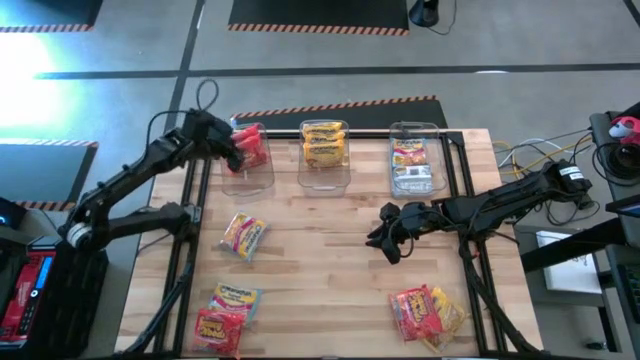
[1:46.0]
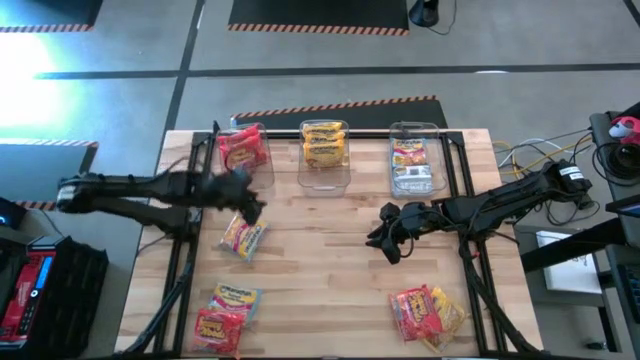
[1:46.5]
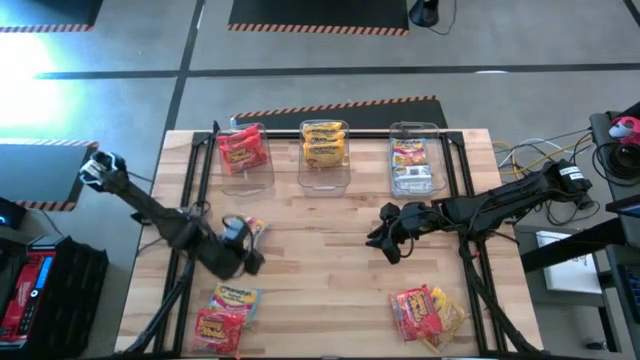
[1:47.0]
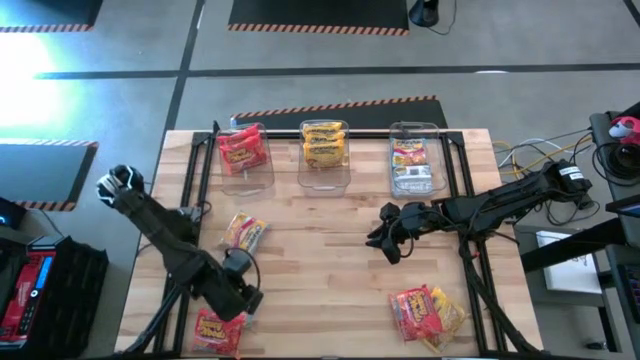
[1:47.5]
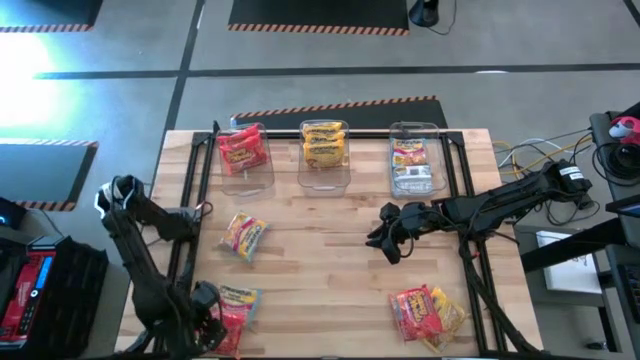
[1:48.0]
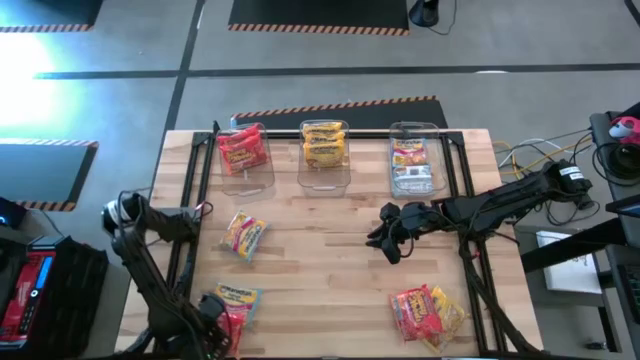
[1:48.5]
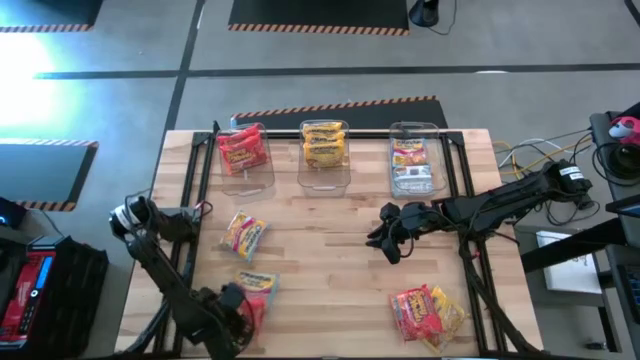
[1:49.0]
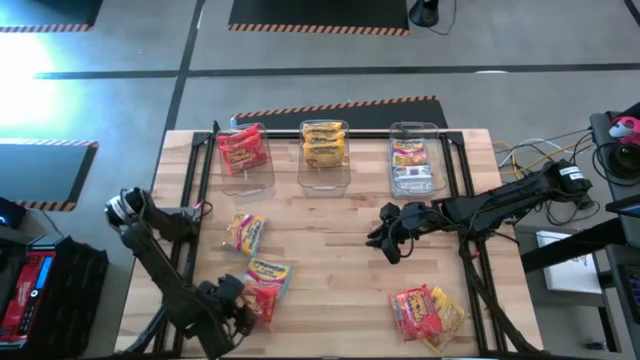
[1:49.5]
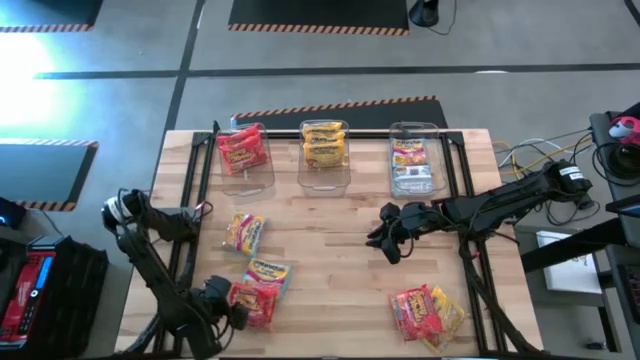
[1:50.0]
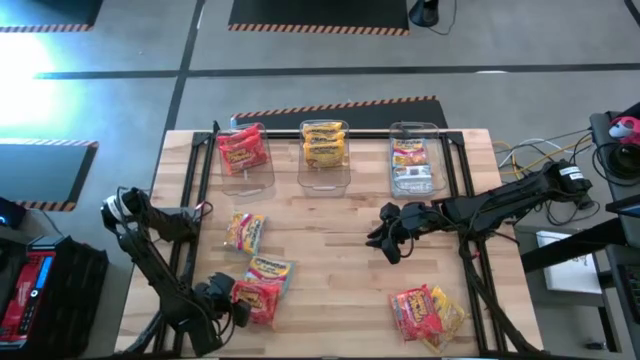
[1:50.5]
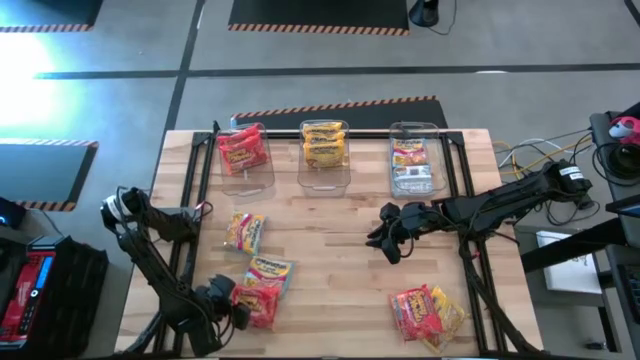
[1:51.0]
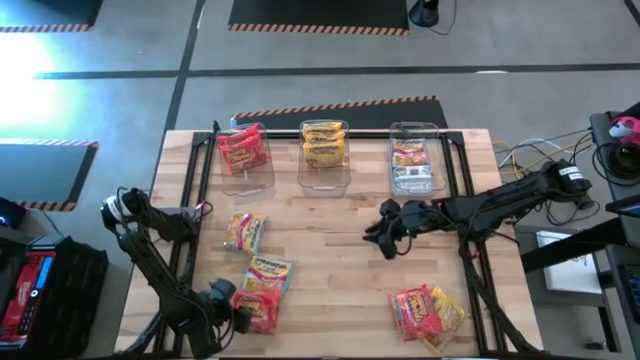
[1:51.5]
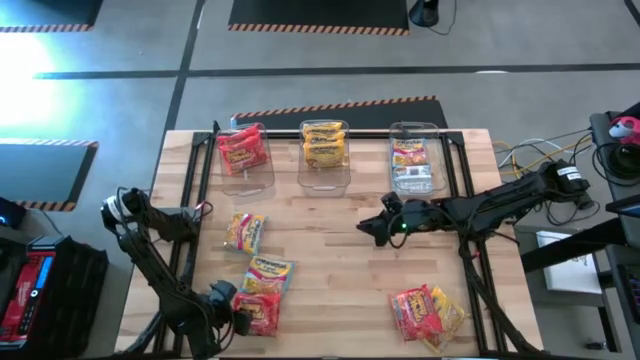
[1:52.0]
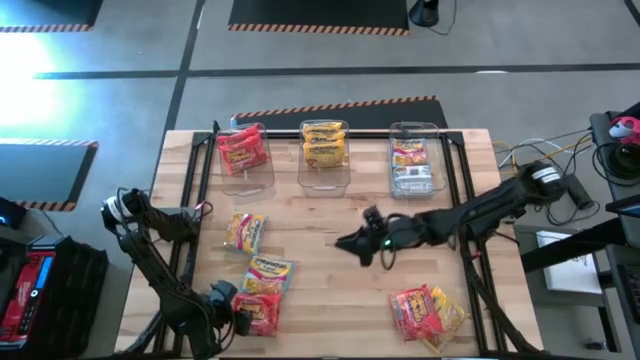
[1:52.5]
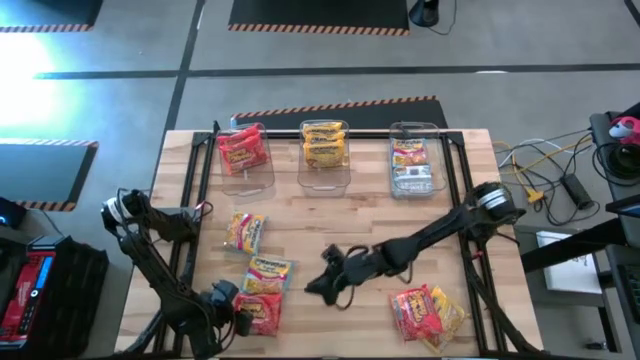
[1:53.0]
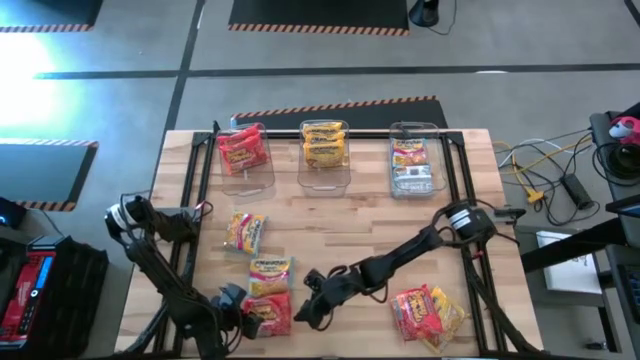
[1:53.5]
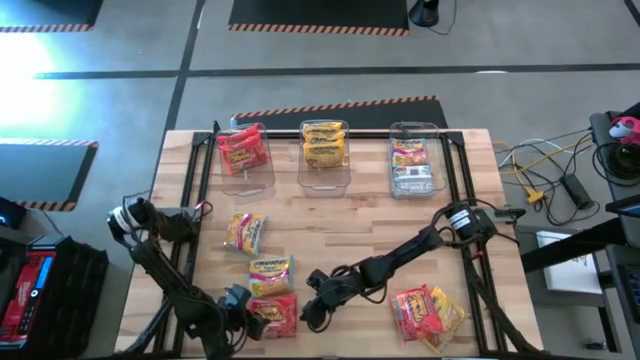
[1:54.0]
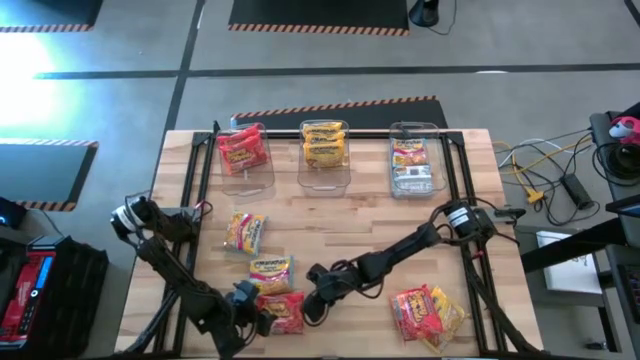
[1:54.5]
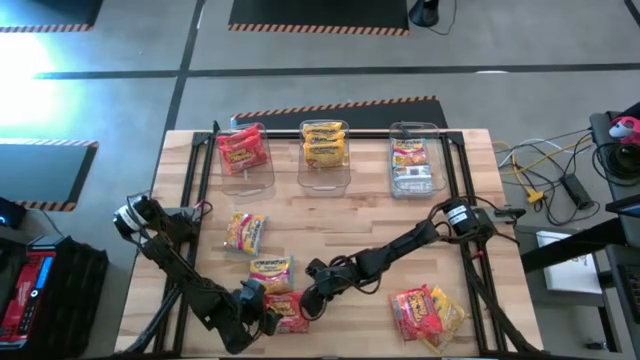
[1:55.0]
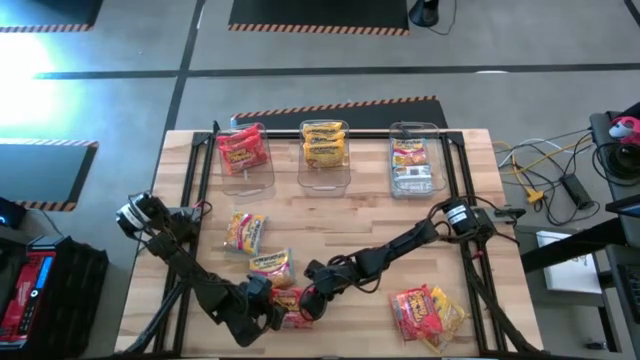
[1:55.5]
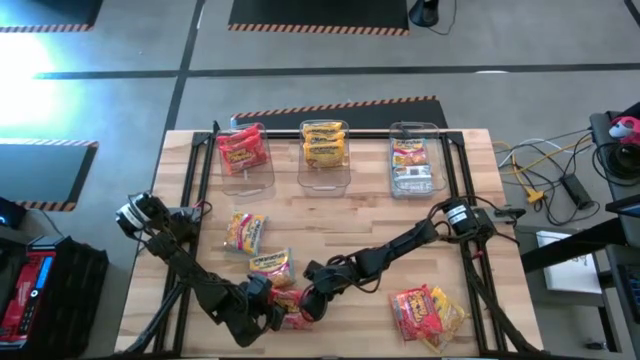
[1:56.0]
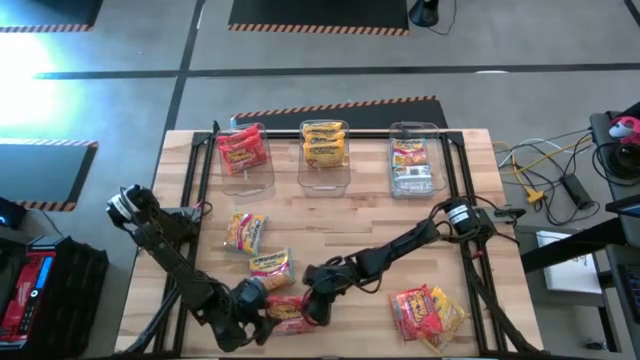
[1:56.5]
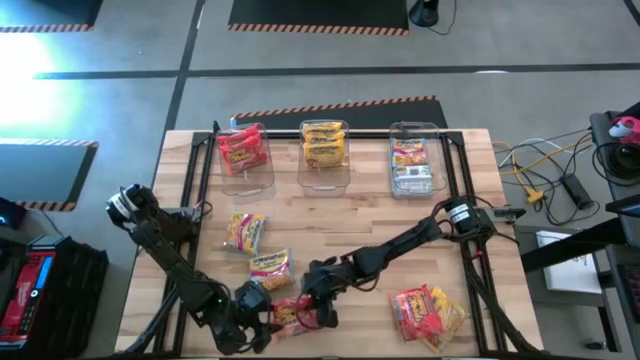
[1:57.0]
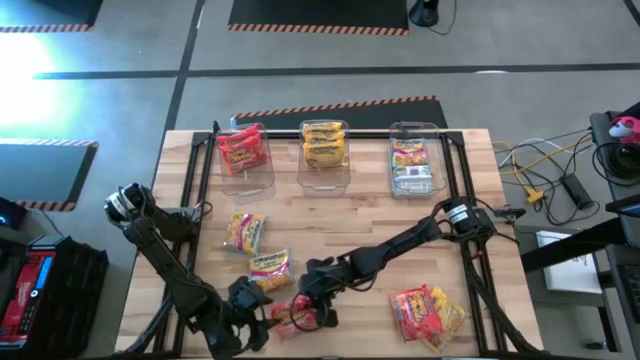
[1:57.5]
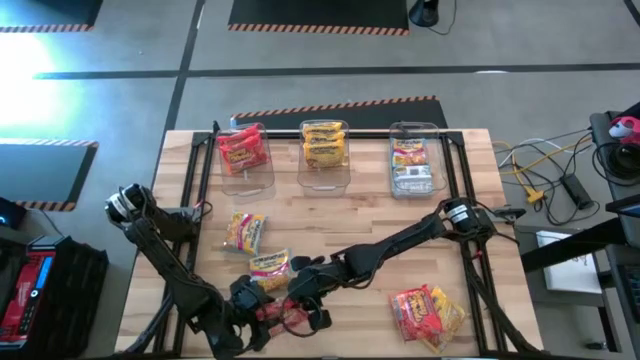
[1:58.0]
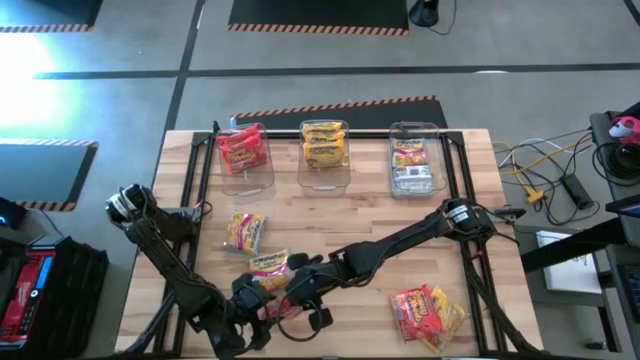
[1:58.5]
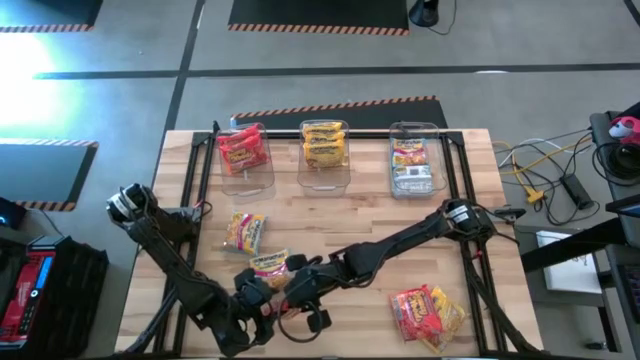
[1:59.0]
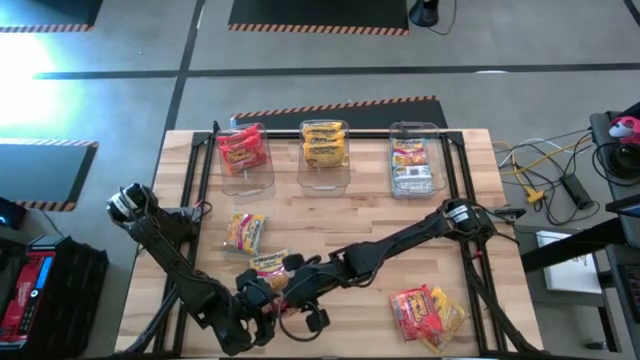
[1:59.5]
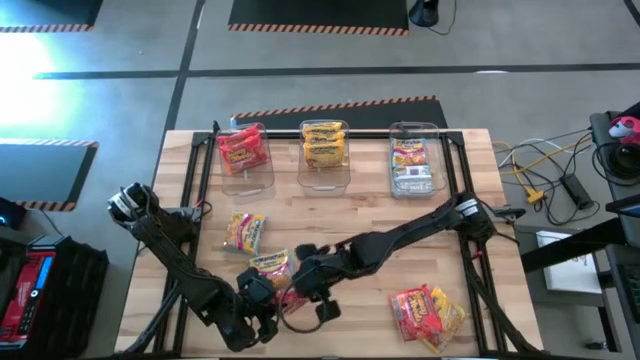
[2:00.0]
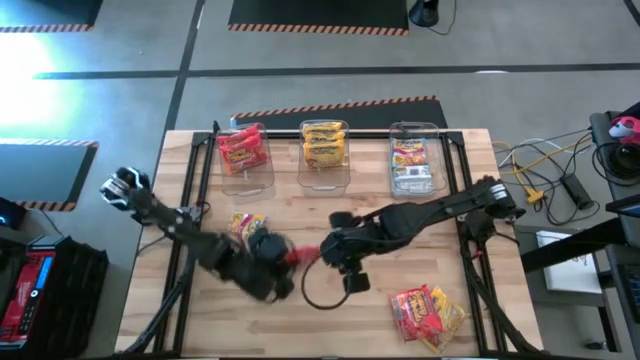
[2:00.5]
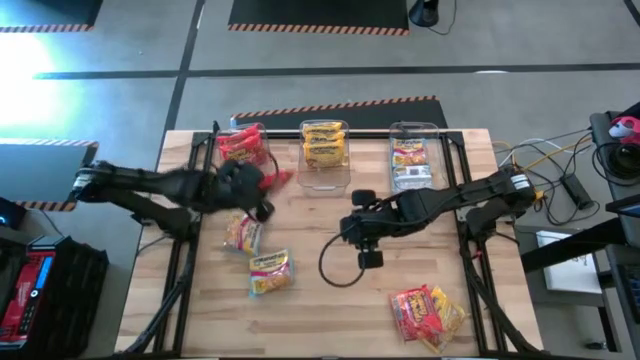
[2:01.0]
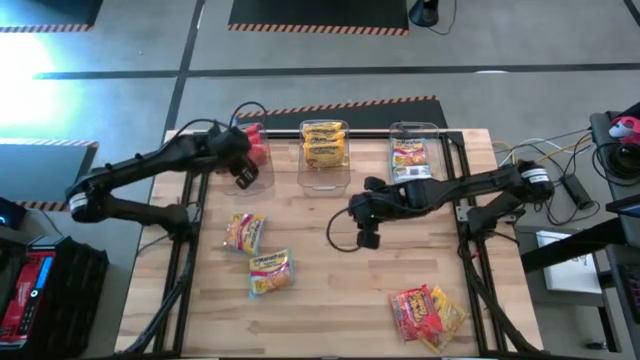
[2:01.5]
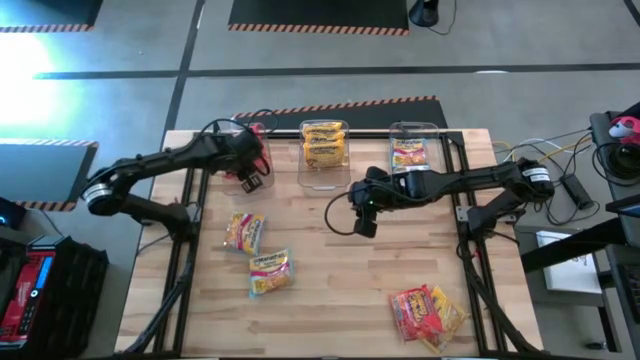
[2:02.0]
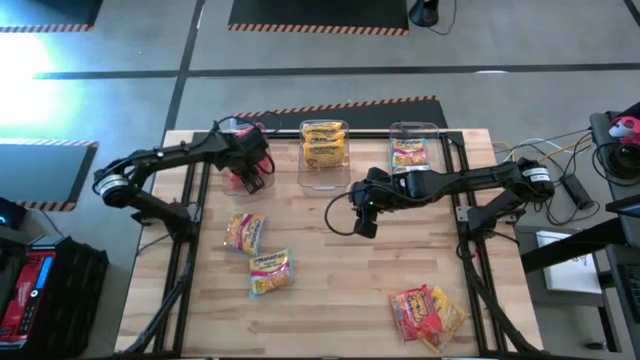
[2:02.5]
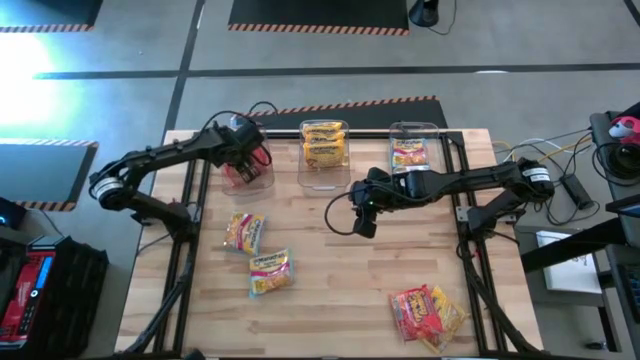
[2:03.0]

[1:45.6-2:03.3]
Task: Sort Maruchan noodles
Put the orange noodle pack into the left transparent bin
